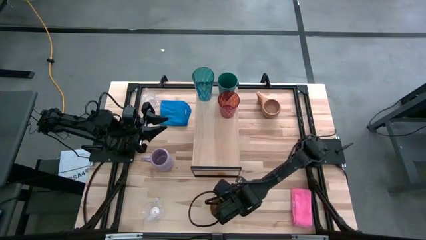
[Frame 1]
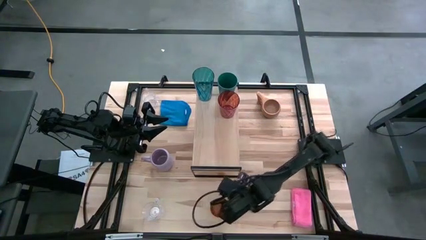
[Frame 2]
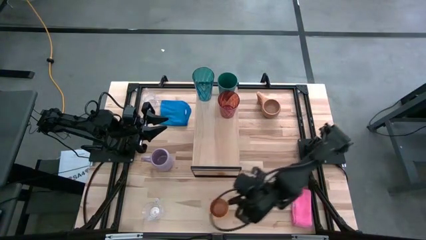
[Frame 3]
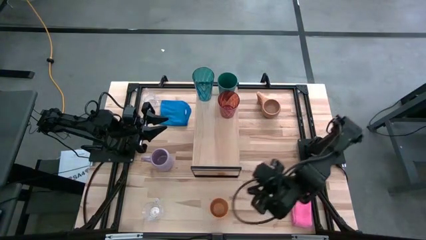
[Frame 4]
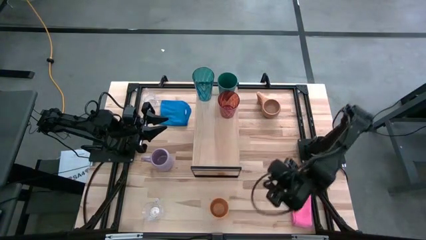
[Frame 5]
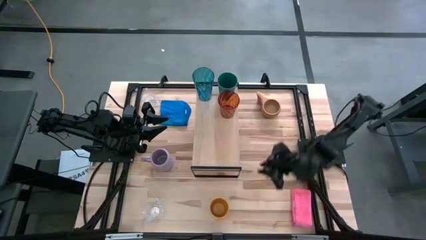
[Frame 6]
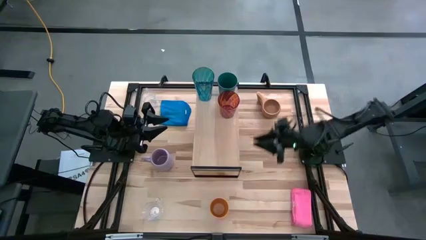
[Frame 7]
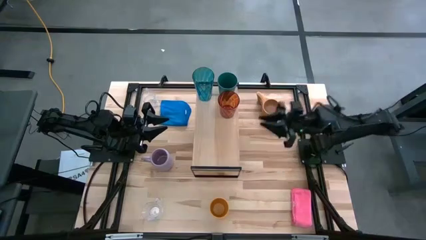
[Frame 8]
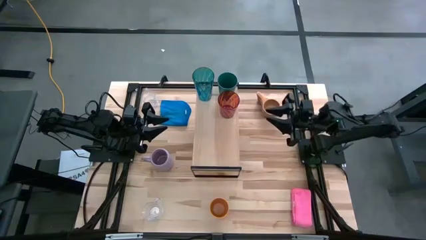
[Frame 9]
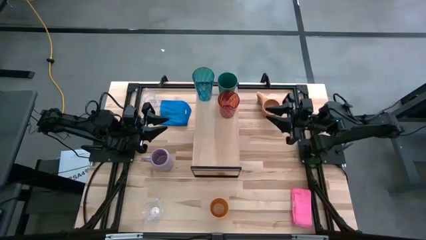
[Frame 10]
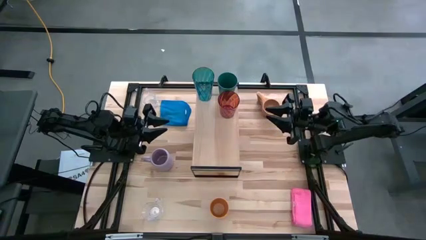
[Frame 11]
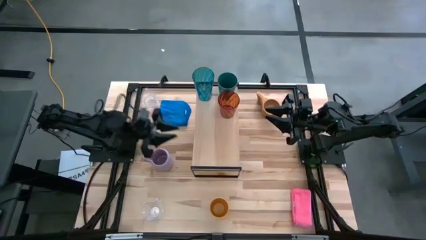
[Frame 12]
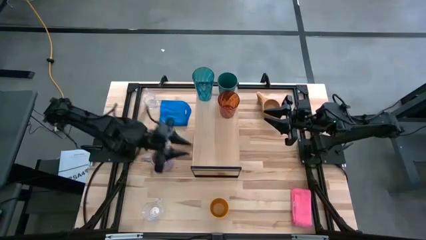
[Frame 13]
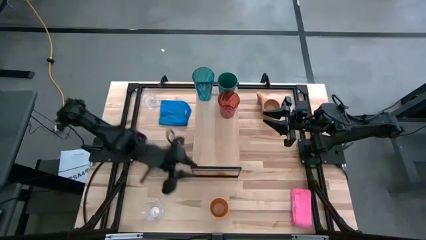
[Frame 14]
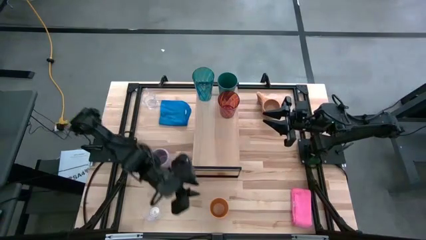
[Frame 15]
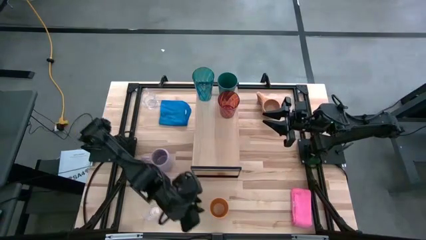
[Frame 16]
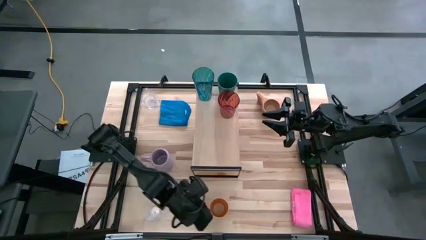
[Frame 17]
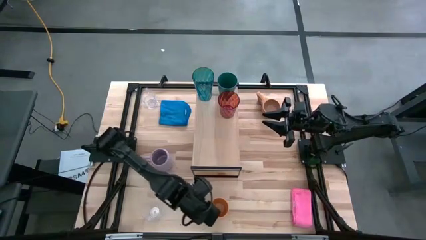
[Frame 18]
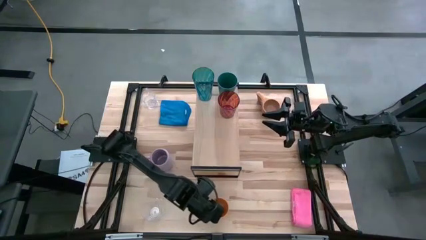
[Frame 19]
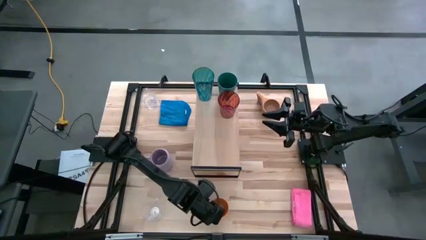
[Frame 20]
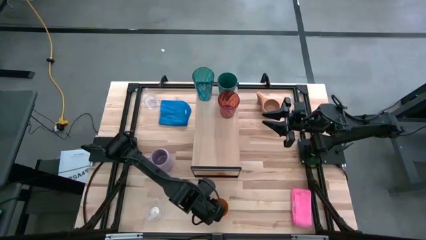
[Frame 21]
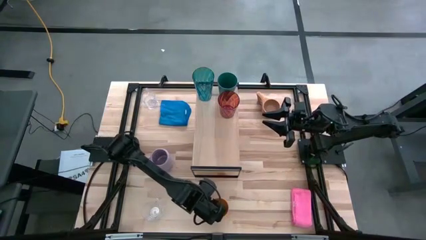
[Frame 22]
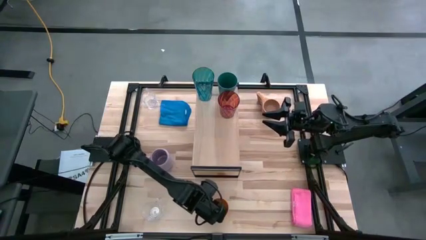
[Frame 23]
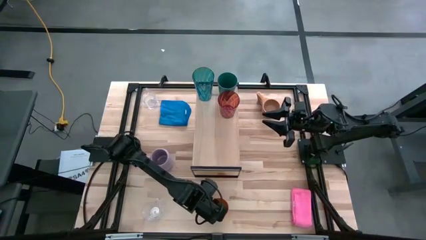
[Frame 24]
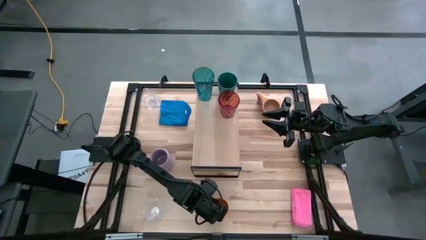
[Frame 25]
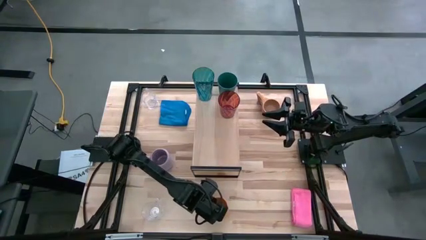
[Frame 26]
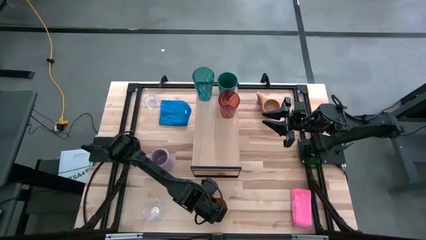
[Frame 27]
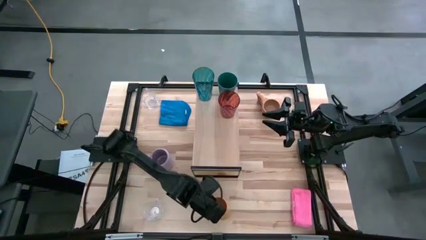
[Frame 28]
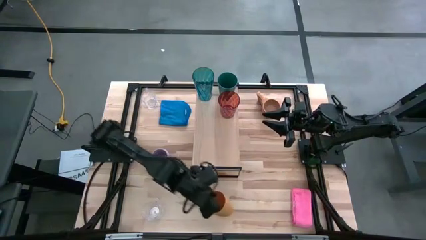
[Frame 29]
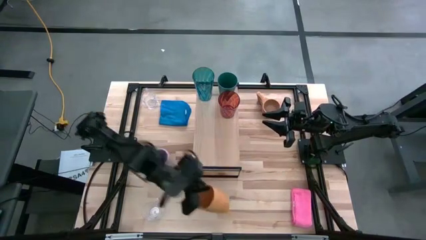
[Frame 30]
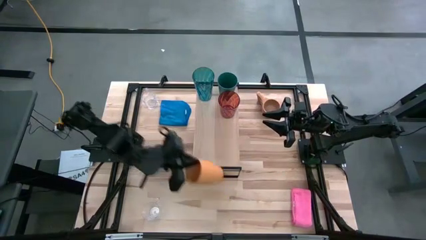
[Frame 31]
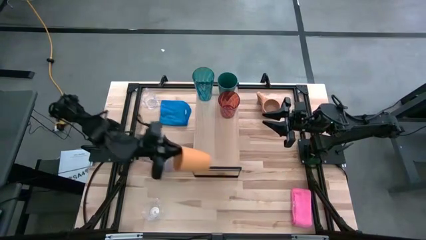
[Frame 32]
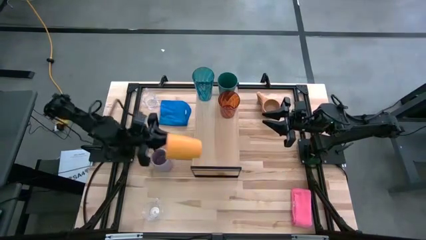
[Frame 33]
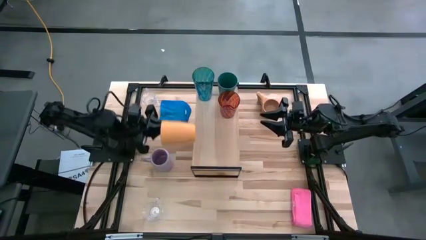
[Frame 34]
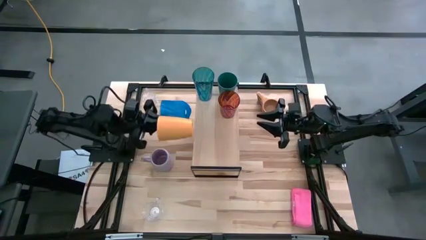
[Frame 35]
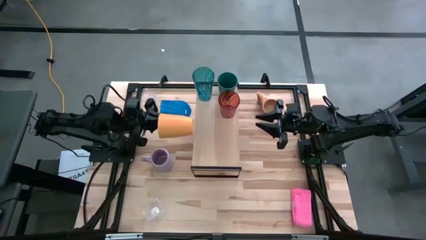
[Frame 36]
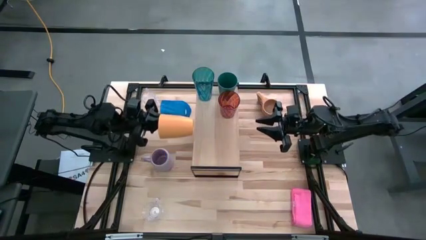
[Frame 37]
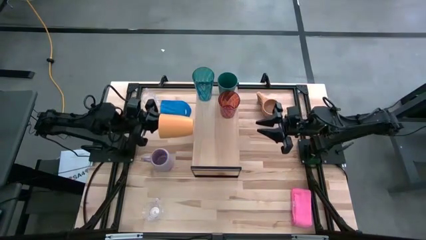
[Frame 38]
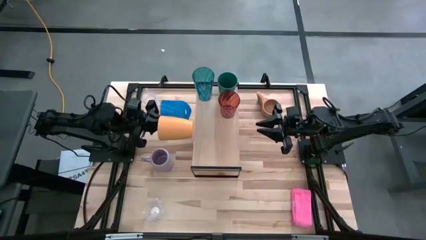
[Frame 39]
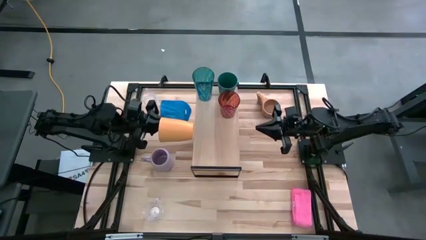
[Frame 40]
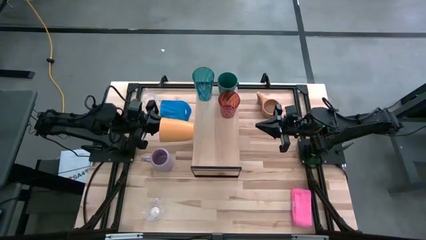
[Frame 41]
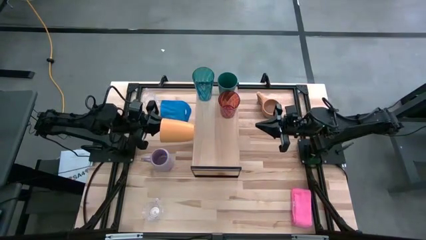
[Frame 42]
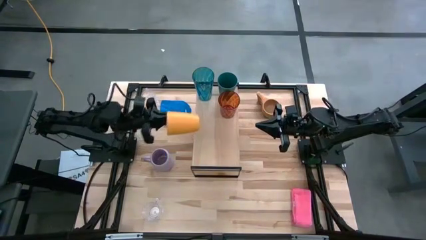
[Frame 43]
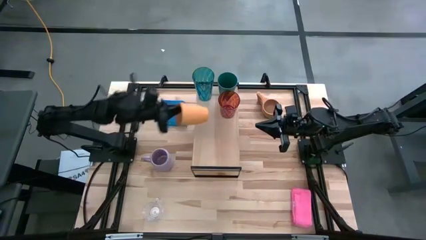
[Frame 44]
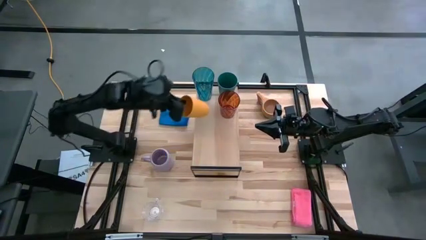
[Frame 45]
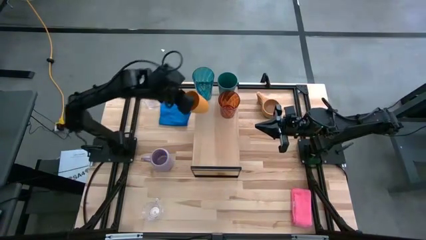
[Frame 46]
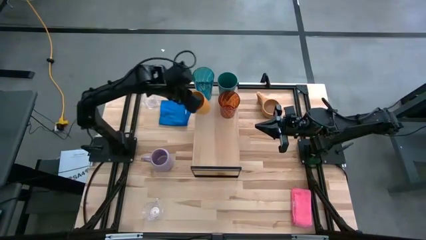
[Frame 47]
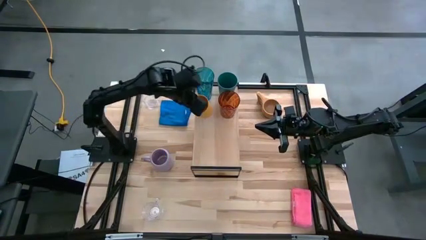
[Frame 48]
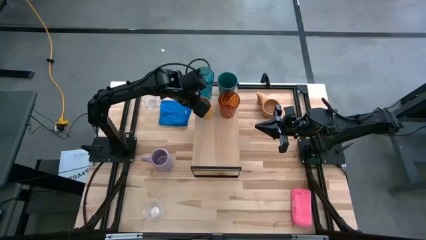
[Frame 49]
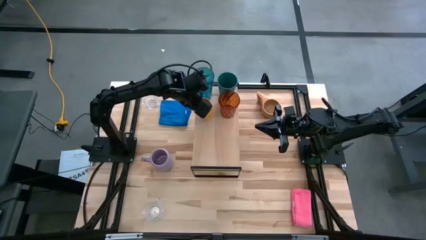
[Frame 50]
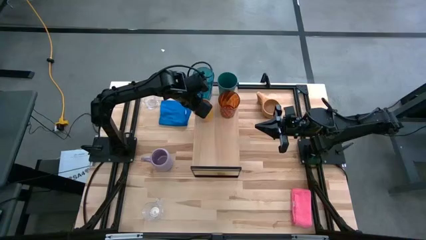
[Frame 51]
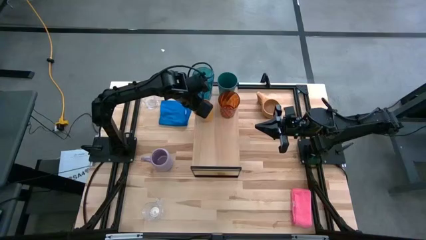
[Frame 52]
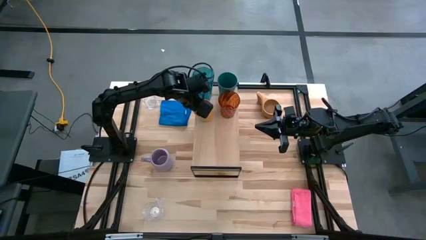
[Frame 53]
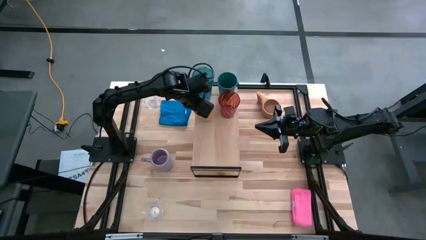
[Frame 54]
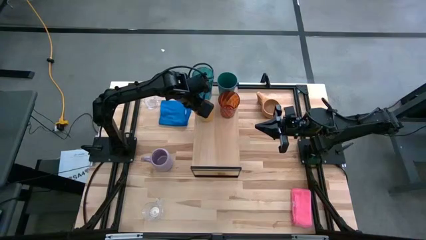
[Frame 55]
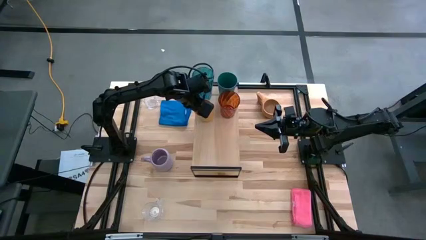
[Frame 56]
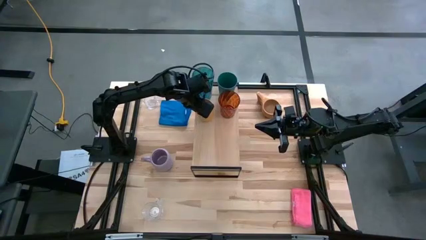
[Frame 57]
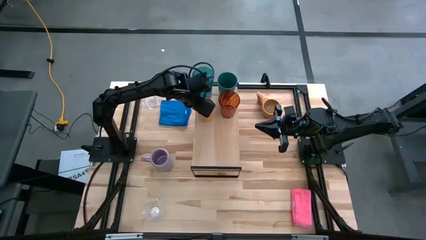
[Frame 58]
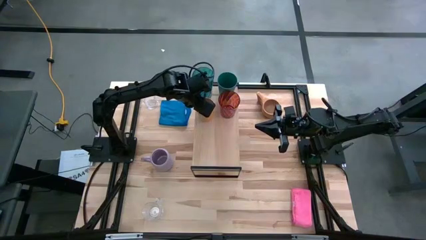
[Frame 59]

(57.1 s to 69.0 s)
Task: Stack small to large cups/mugs on shelf
Put the yellow cup on the shelf

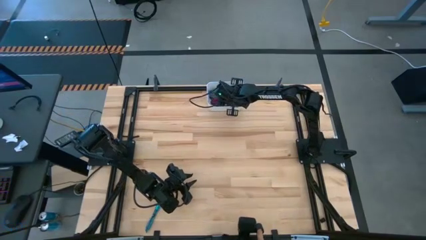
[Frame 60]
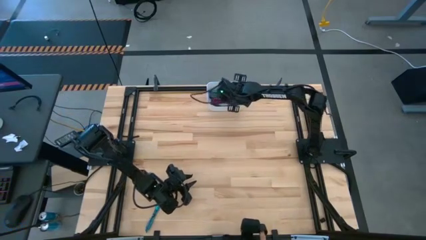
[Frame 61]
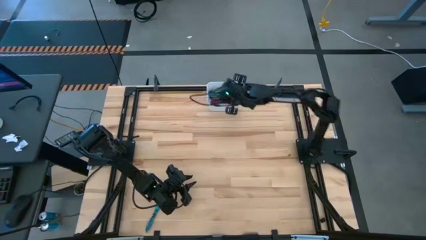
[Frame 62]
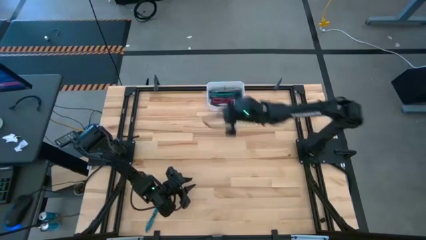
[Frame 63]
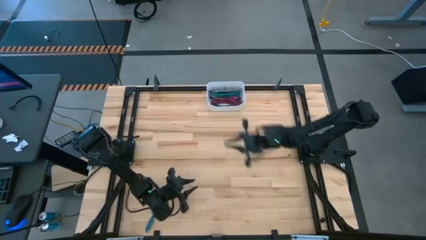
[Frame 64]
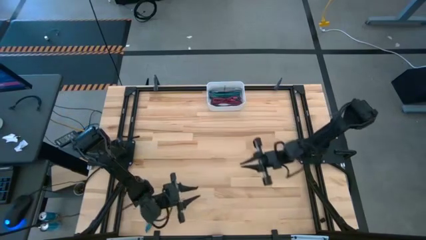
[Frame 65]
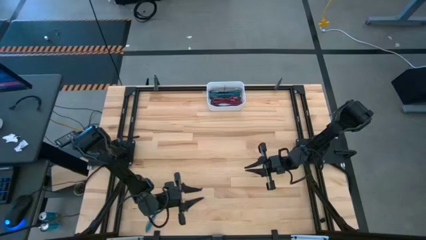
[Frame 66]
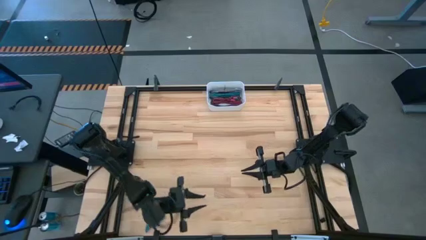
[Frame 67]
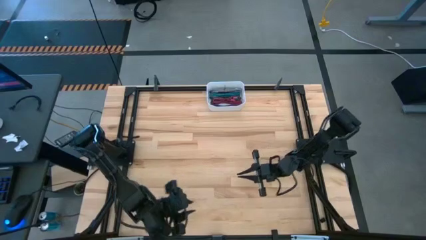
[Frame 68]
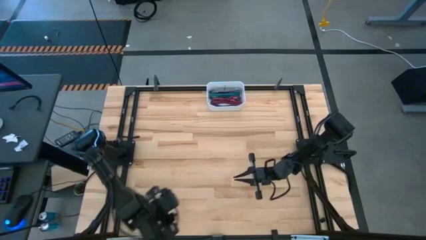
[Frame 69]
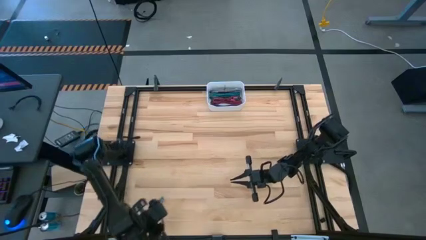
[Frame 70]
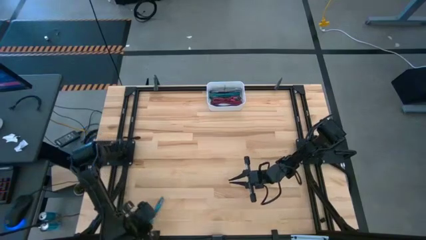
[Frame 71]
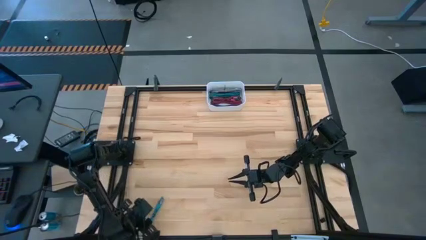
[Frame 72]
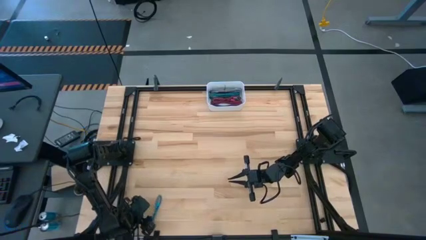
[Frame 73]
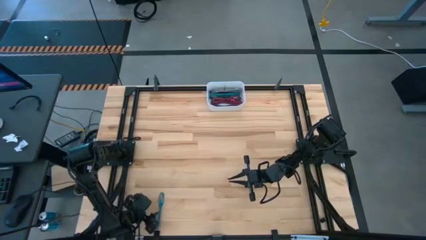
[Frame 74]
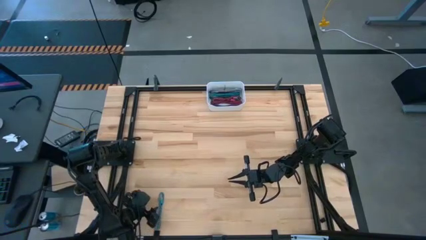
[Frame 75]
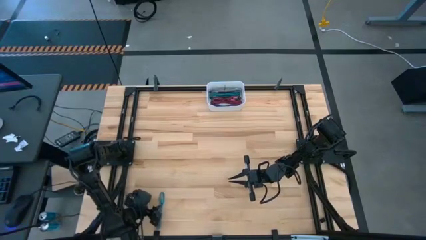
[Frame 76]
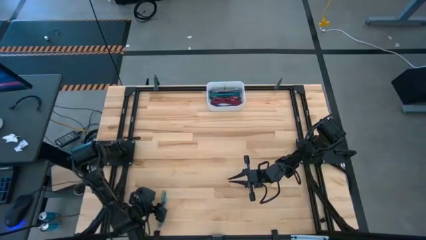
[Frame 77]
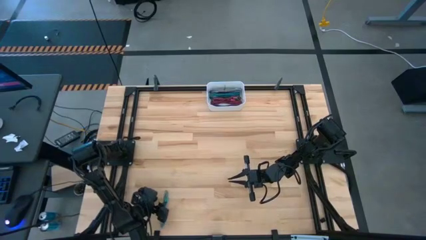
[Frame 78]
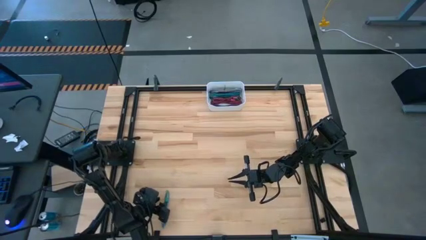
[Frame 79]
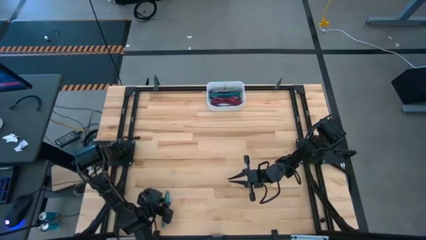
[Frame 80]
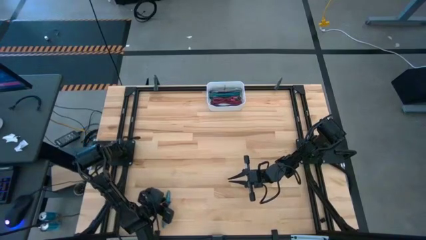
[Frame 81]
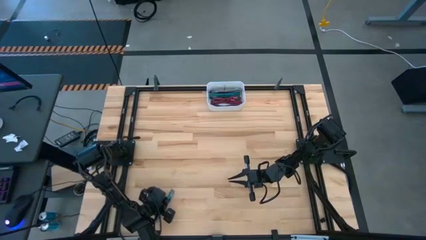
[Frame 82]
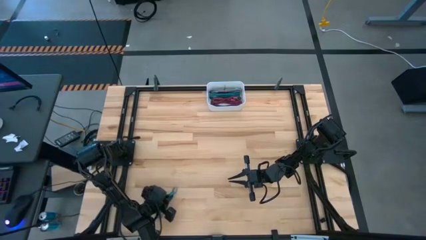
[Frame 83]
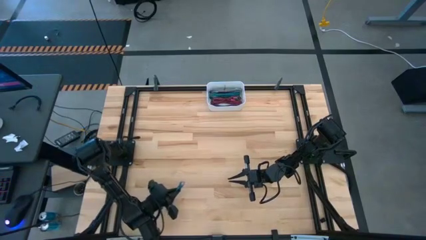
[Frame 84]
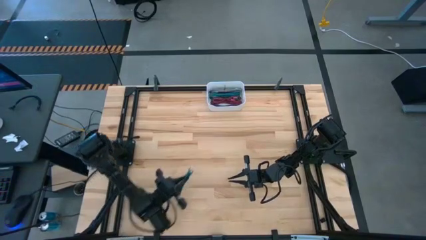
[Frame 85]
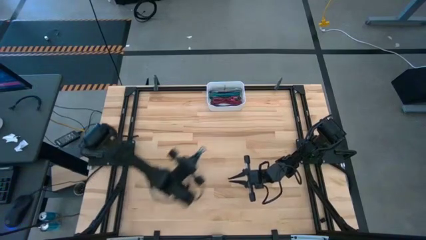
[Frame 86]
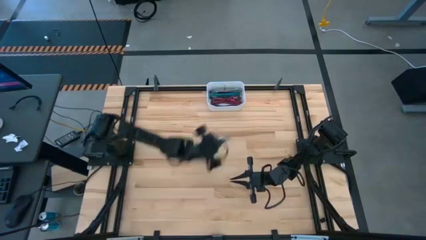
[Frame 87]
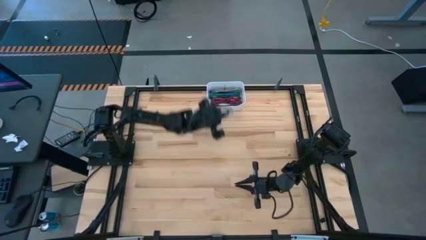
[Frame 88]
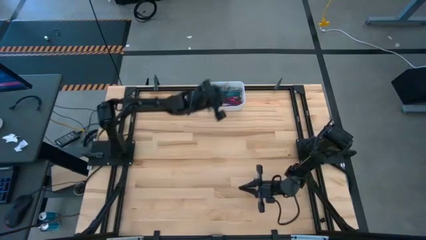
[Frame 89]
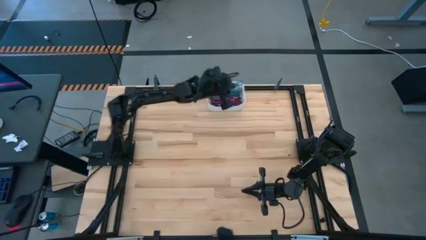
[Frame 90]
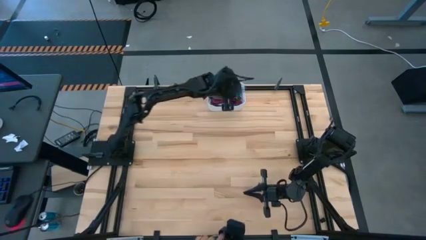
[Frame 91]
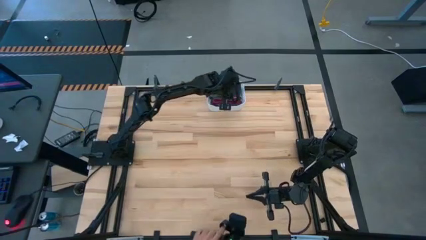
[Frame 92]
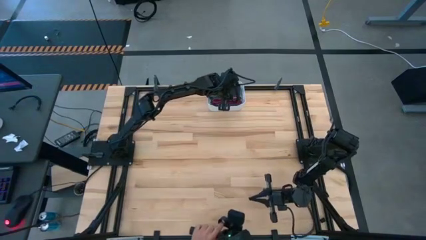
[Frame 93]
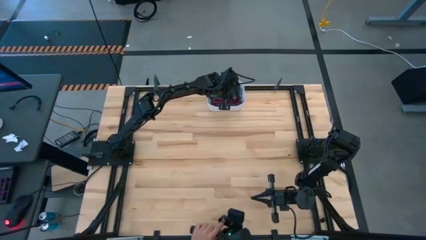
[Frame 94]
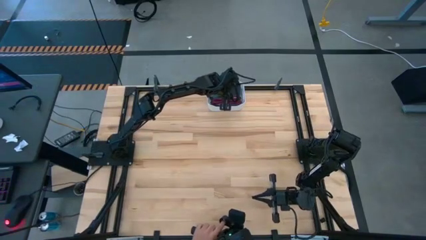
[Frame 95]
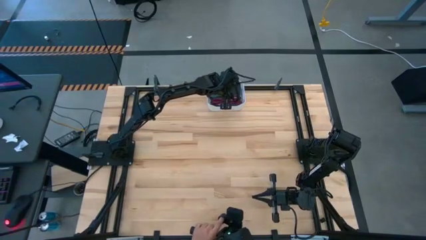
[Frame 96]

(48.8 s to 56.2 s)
Task: Pick and place USB-C Cables
Put the blue charger cable into the white bin
